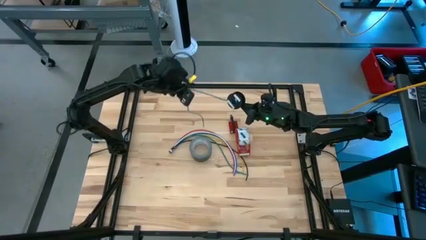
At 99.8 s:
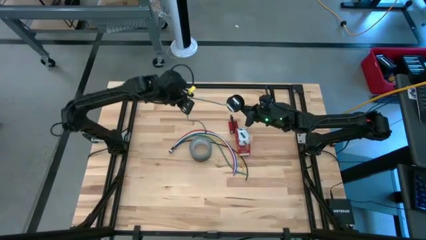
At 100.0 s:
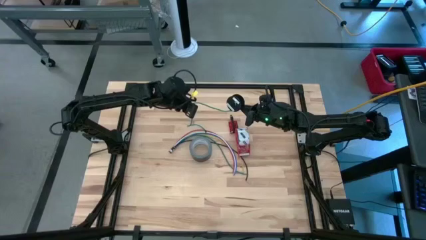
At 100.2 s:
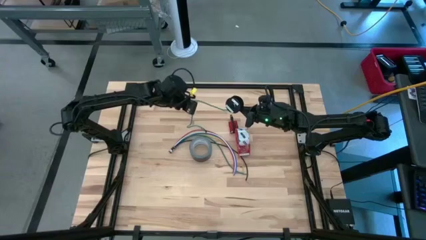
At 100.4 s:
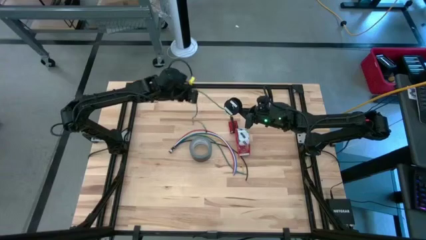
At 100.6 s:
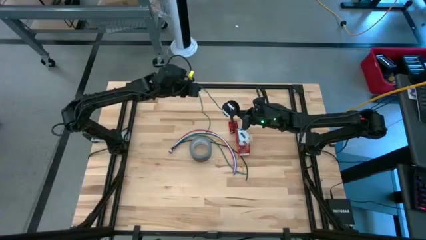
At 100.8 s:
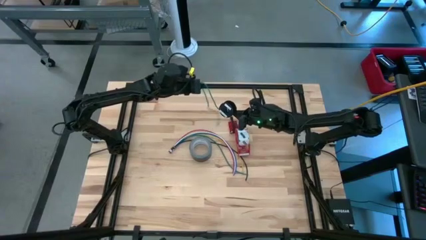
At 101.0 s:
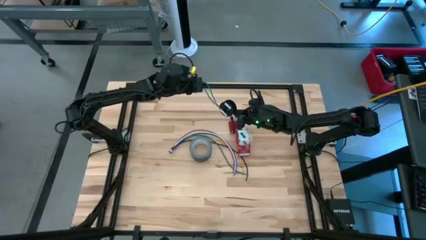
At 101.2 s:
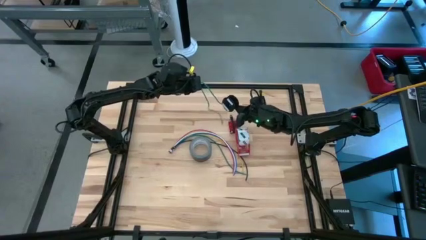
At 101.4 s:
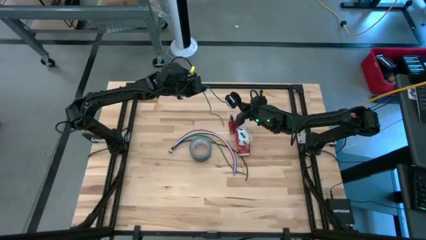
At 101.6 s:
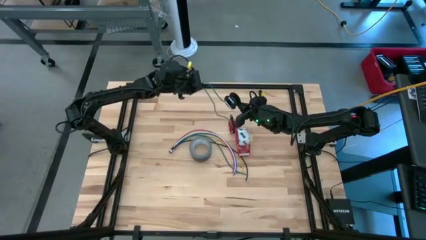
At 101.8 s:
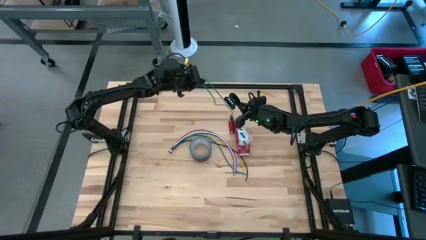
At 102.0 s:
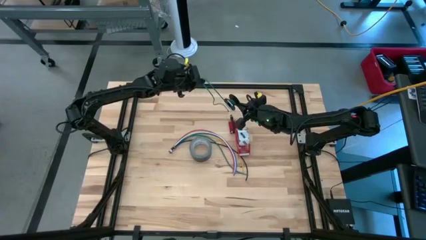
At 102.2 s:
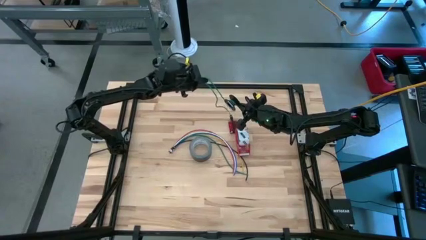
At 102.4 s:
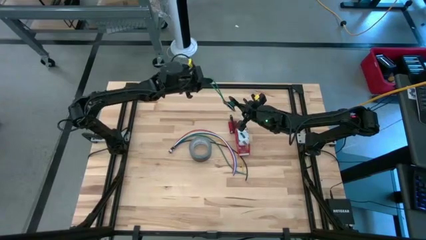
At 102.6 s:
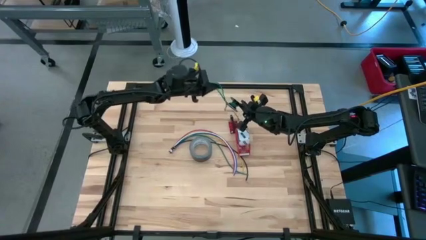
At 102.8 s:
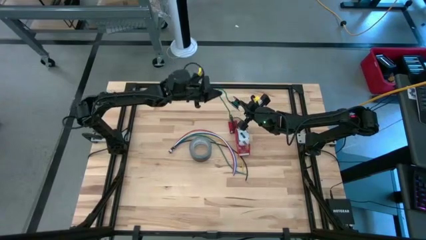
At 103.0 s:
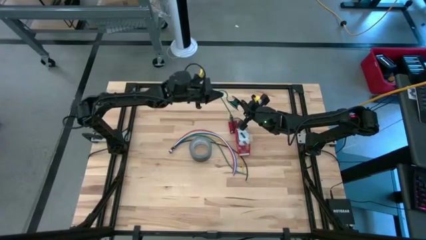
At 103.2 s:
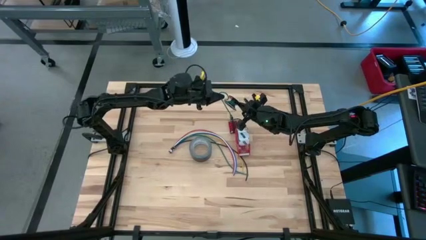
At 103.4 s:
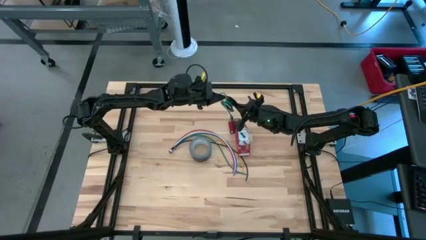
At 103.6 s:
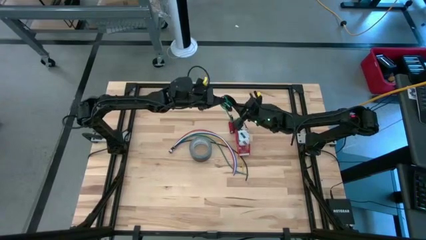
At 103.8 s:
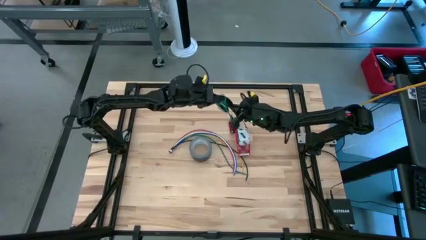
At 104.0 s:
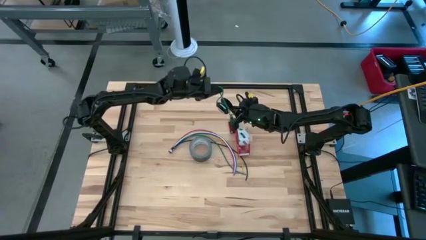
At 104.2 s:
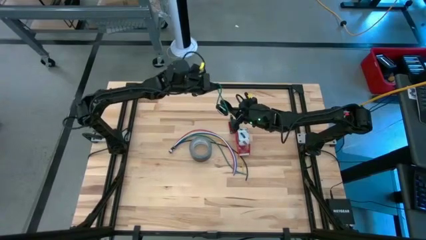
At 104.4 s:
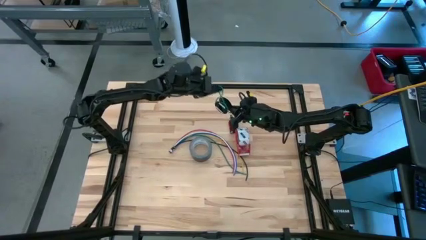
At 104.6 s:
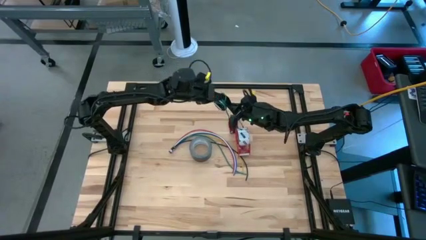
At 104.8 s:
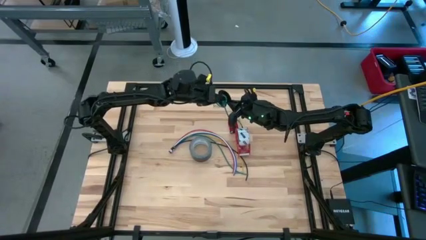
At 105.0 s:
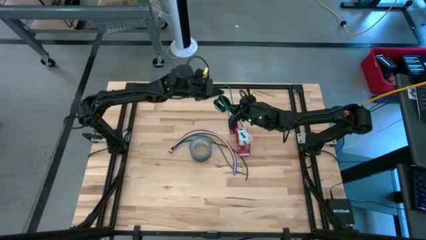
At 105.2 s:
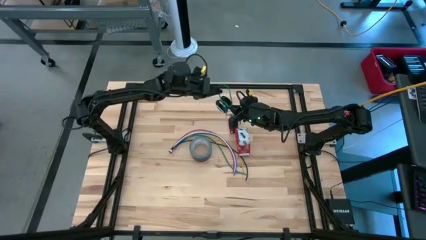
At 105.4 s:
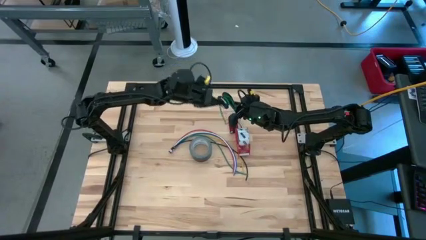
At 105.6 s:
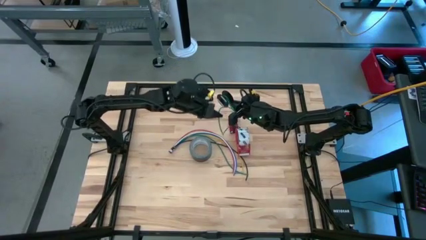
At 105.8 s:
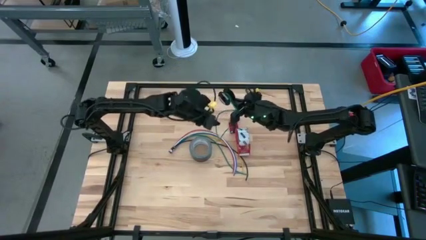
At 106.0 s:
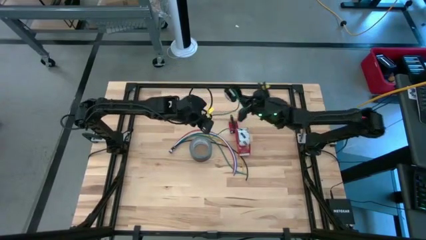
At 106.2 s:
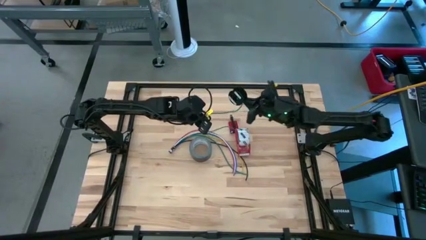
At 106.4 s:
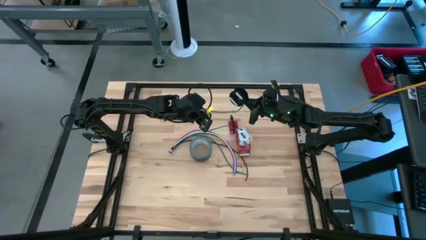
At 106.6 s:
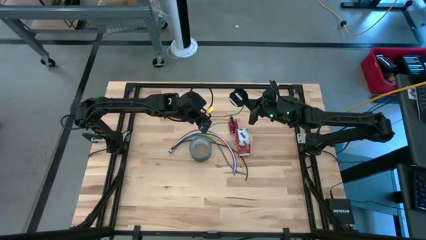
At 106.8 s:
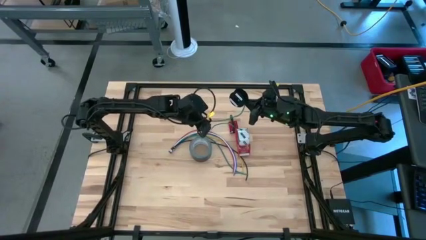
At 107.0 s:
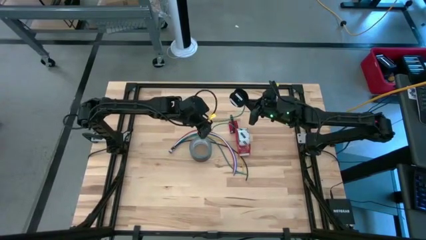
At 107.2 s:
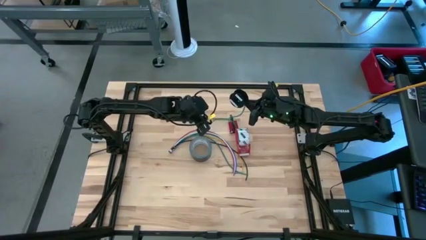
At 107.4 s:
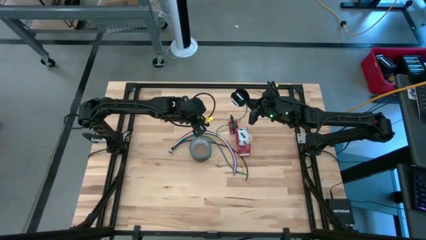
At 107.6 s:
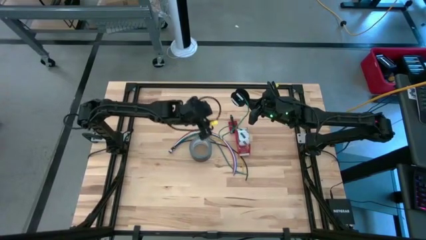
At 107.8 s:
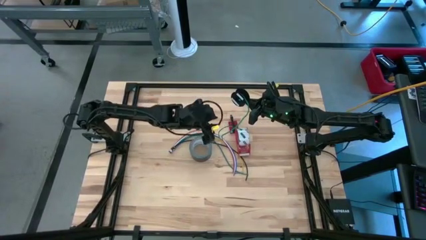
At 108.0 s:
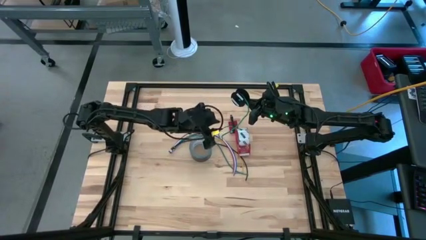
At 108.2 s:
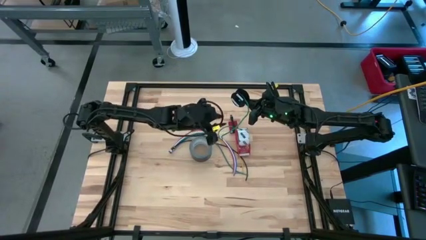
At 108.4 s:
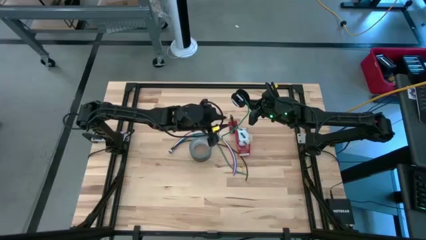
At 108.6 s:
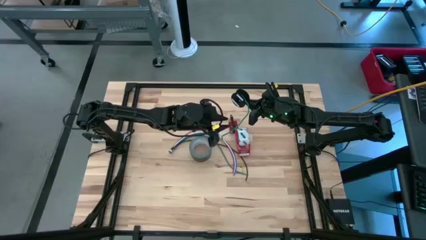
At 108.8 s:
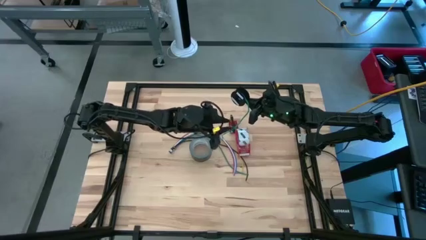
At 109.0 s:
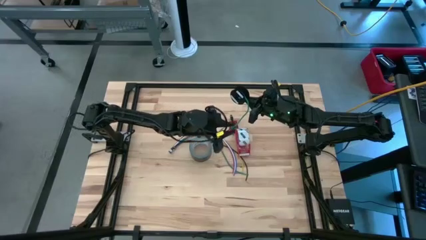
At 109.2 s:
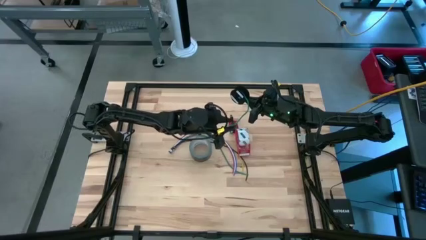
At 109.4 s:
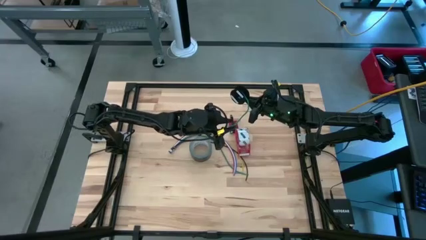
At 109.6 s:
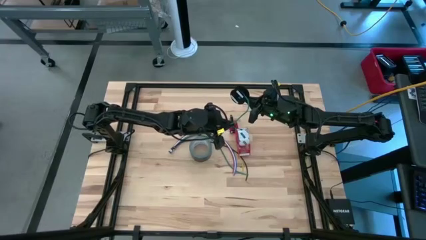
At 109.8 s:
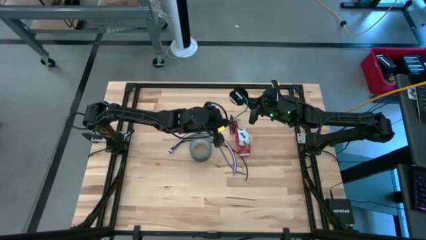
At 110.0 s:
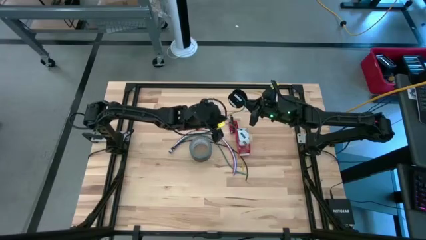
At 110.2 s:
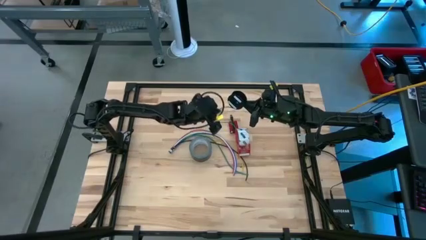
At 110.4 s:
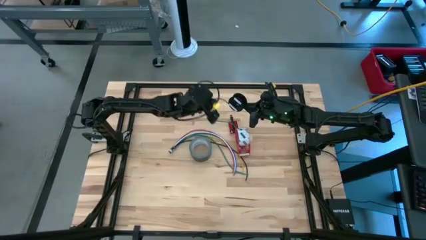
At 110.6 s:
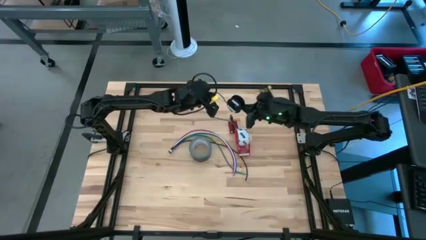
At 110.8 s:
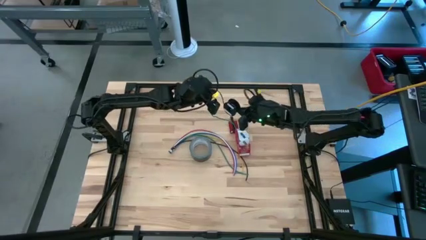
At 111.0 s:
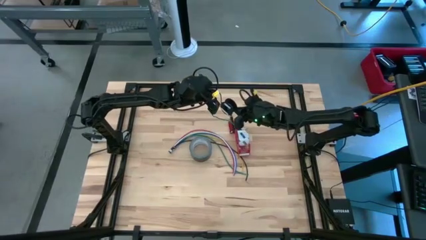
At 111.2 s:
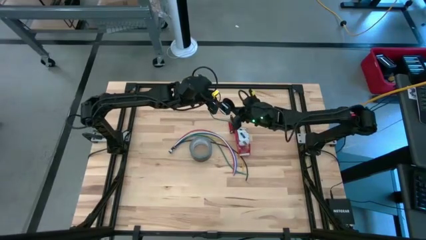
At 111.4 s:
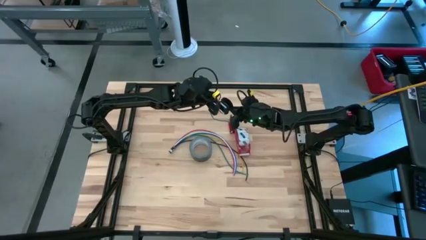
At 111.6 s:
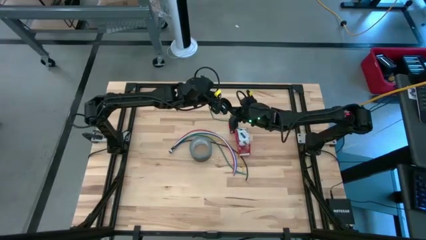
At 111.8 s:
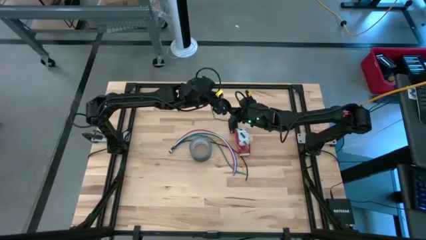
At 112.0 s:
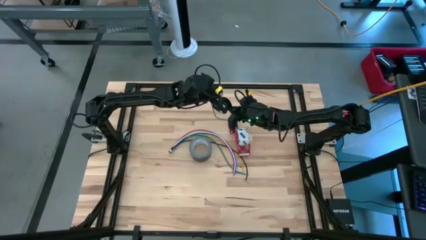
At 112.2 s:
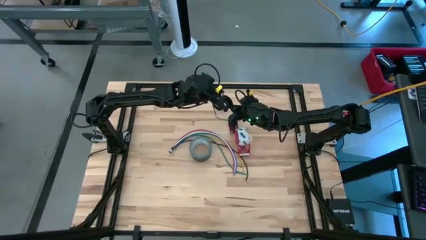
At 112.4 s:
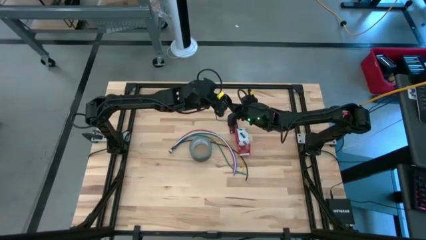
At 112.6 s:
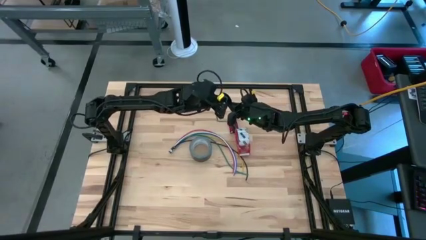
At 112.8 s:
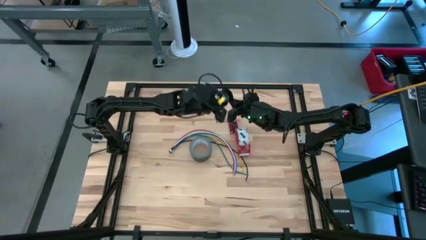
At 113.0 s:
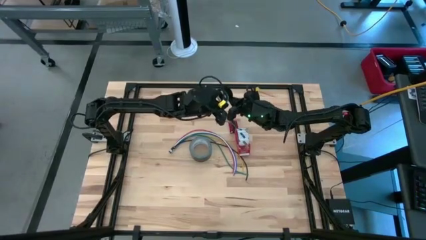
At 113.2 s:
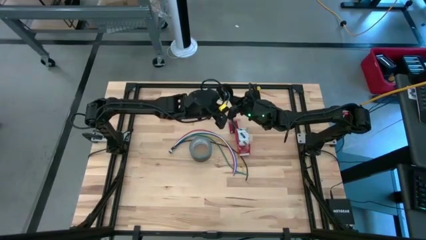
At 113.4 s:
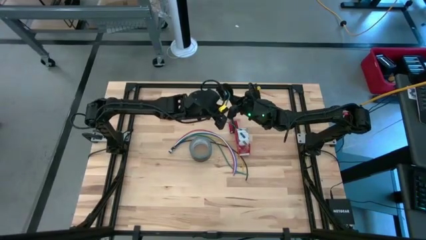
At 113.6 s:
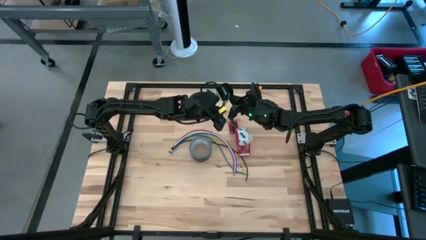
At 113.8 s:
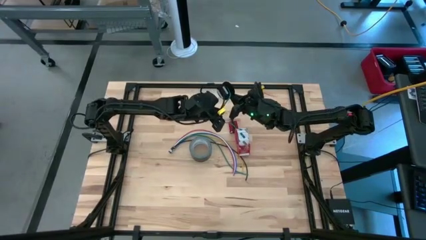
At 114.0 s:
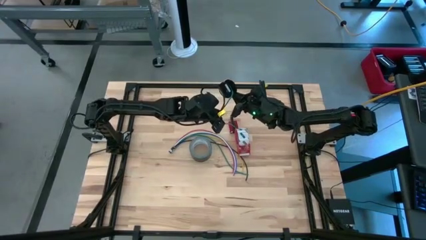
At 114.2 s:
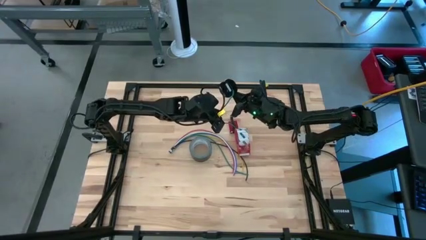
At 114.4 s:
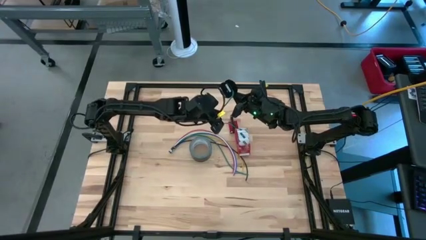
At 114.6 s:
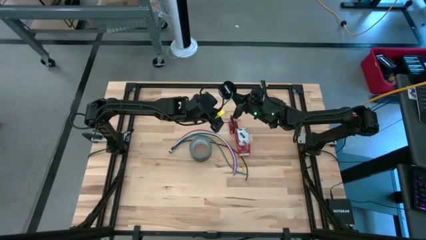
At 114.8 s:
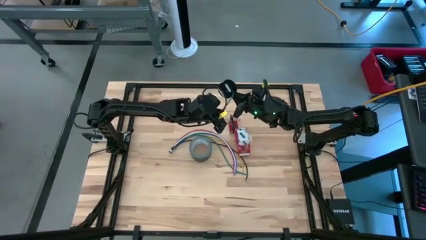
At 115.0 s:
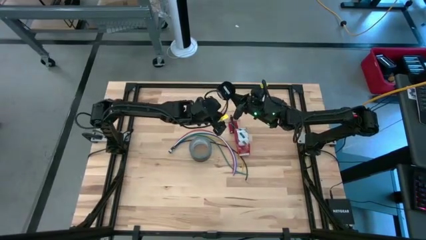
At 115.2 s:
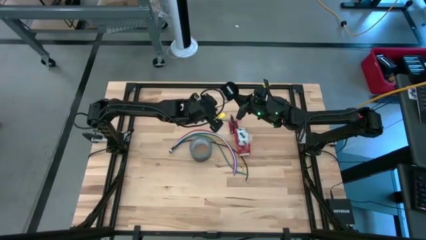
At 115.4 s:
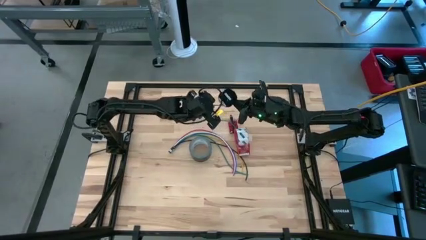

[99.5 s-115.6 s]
Task: Coil cords
Coil the green wire into the spool

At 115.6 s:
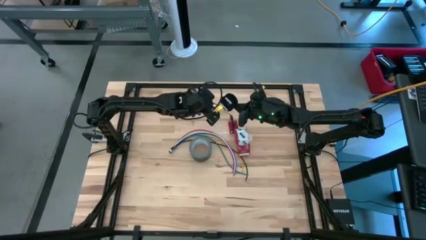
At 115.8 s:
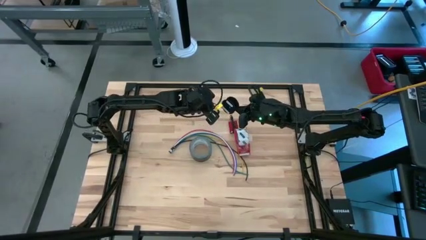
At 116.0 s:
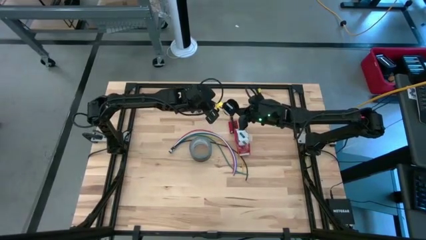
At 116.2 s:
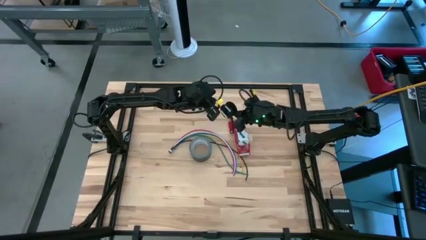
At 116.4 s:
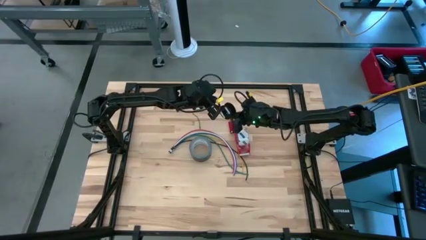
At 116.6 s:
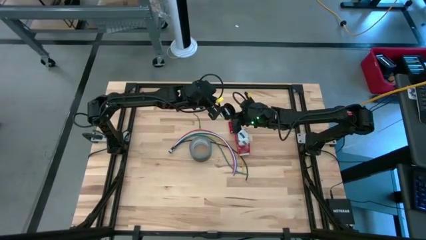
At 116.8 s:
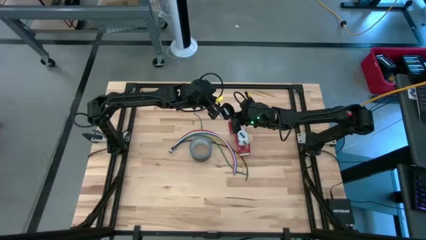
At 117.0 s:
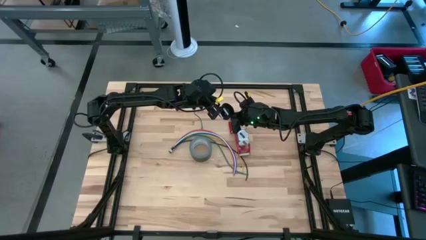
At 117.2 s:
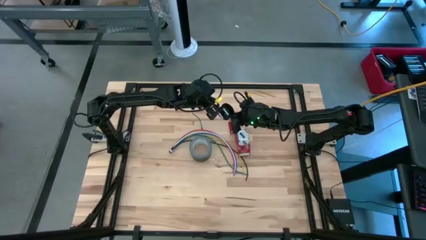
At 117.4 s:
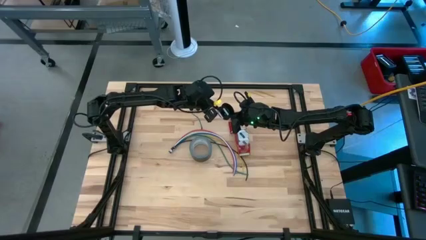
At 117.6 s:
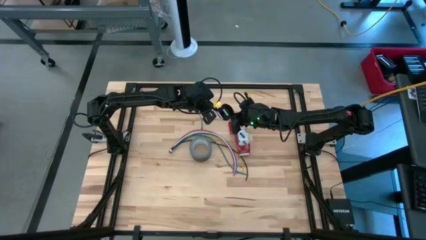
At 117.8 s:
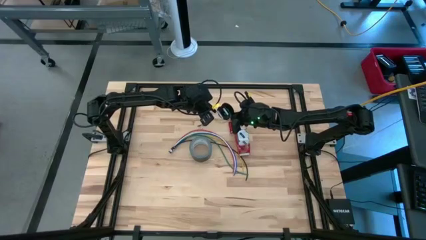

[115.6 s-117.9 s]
Coil the green wire into the spool
